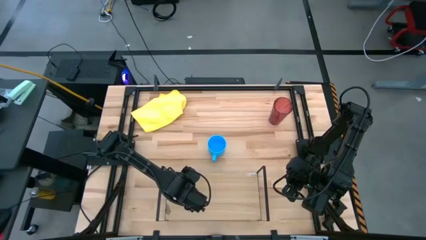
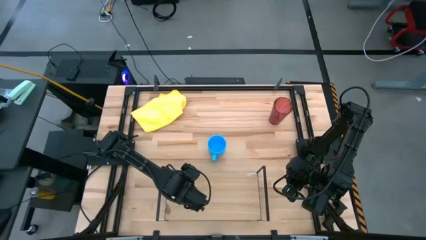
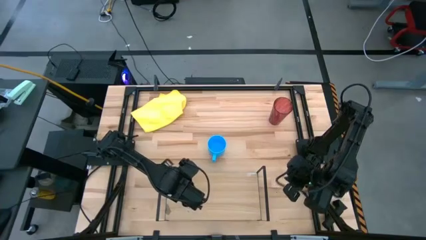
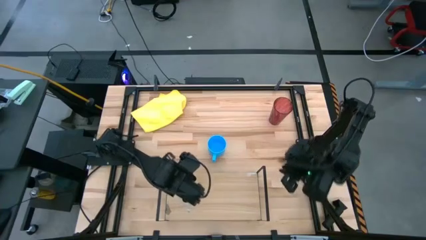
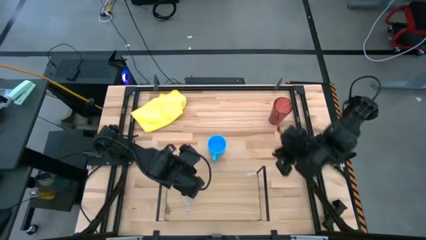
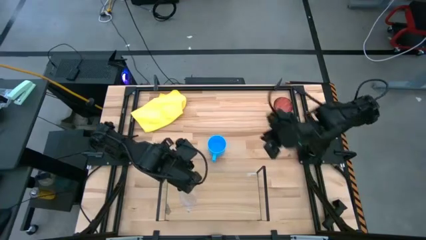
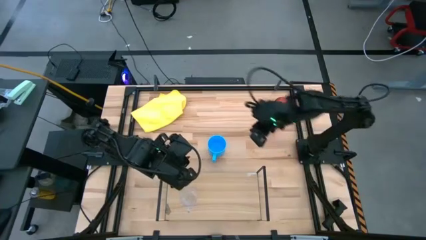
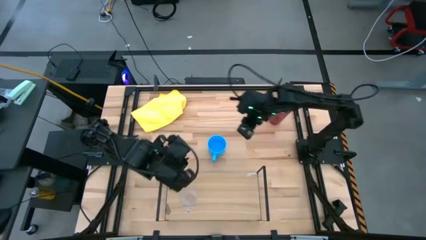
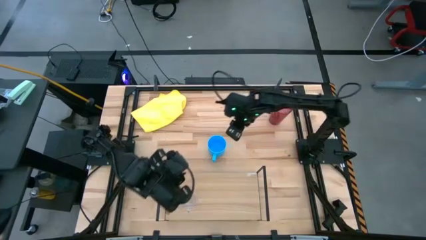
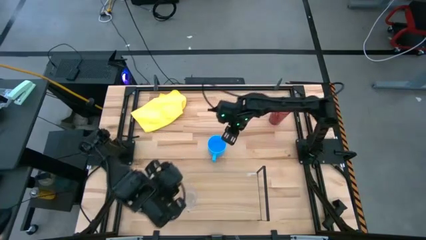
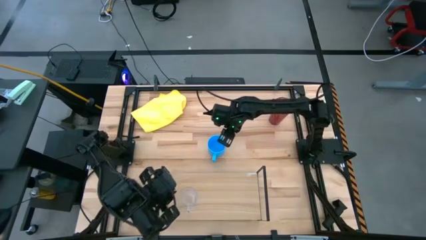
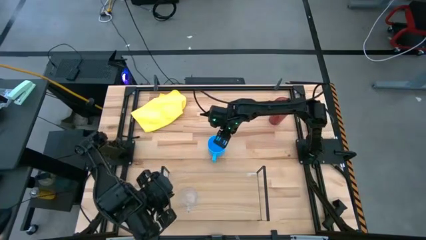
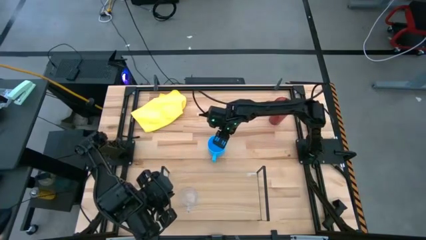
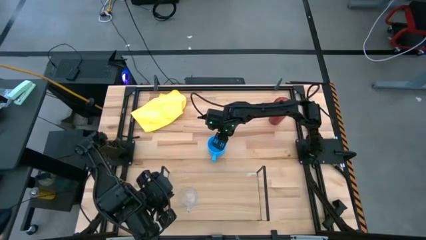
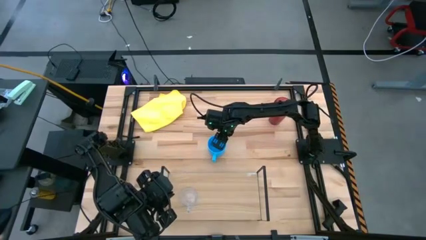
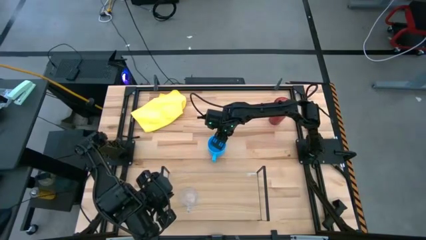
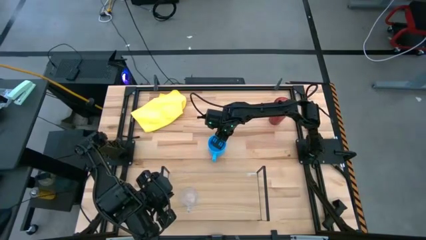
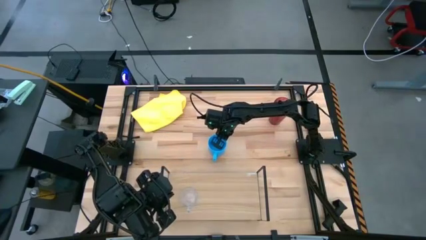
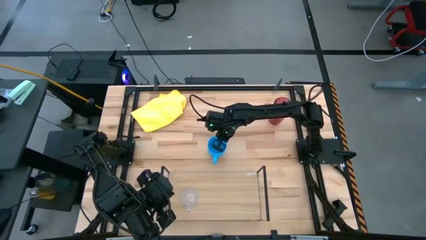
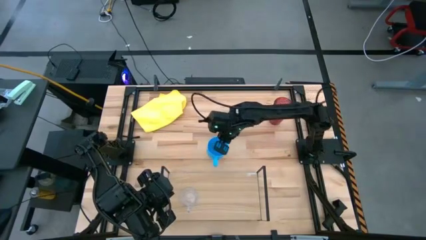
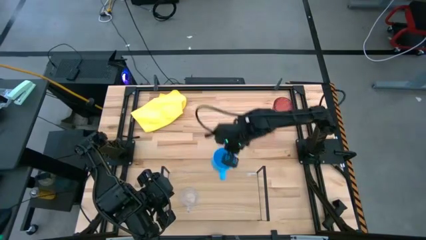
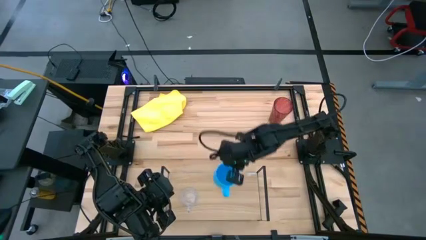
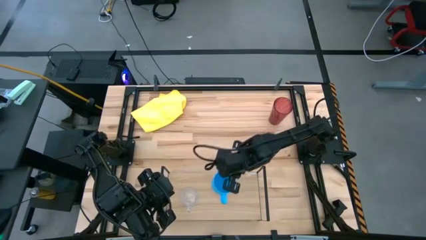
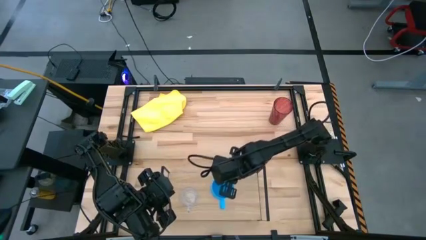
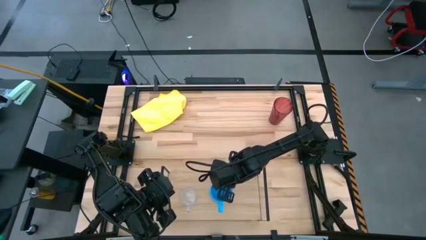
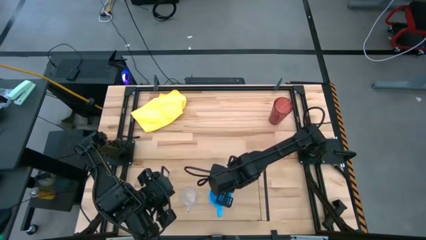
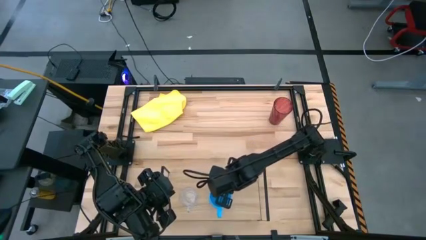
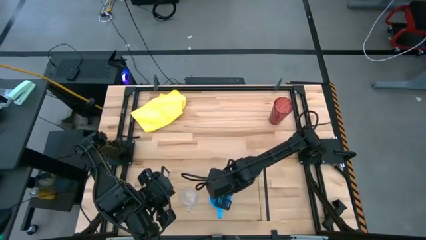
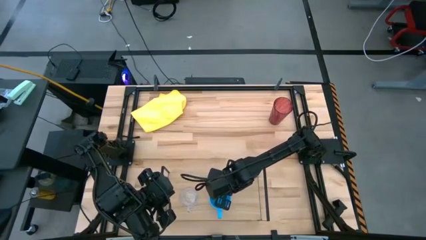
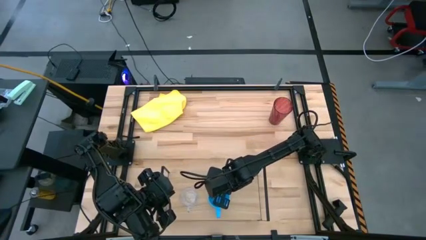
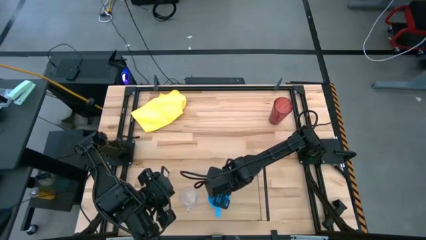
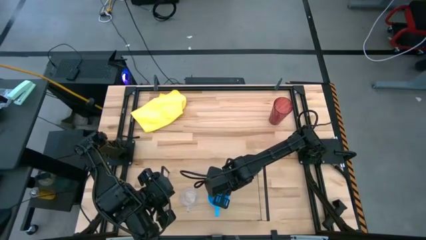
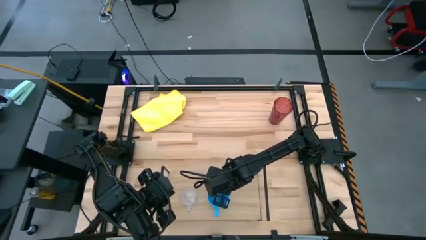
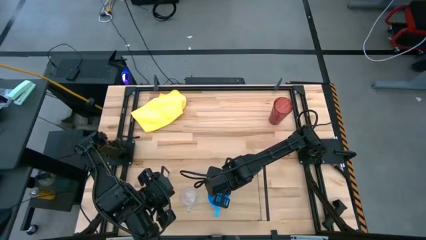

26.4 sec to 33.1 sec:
Task: Stack small to large cups/mugs on shelf
Put the blue mug on the shelf

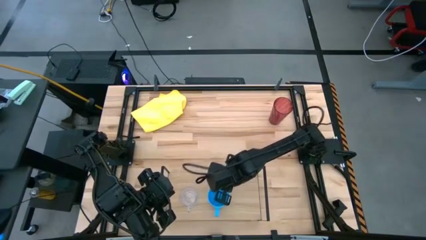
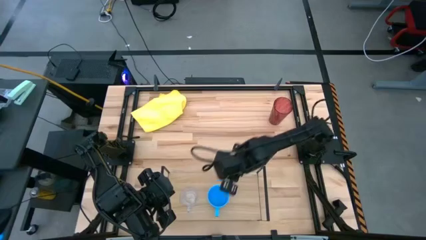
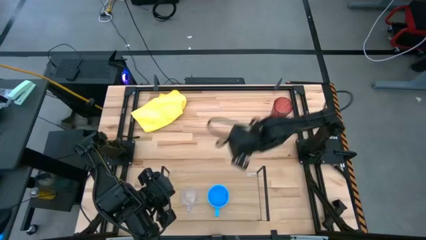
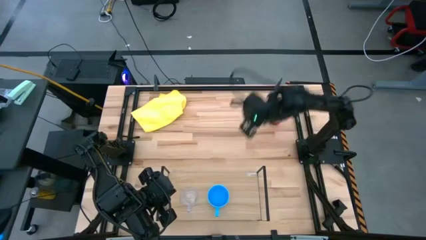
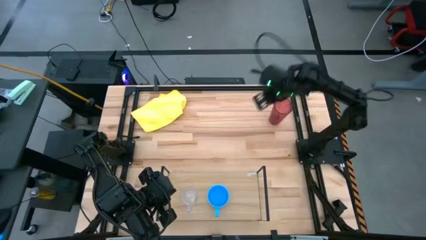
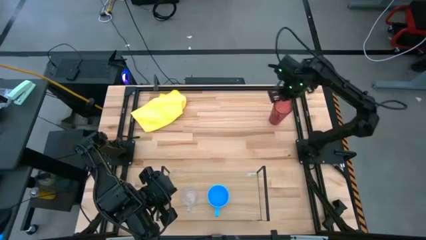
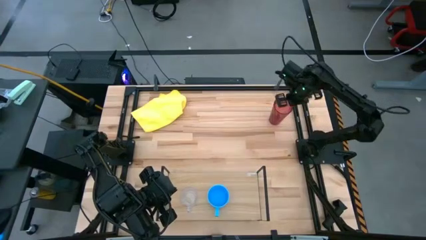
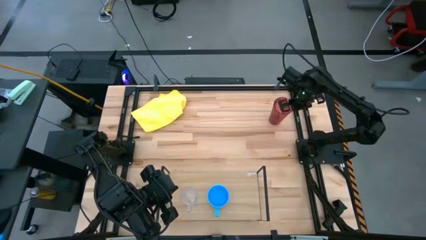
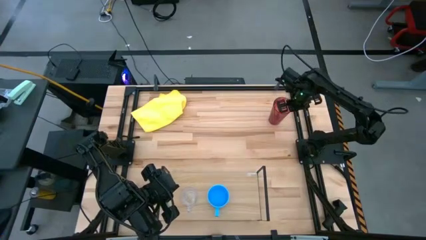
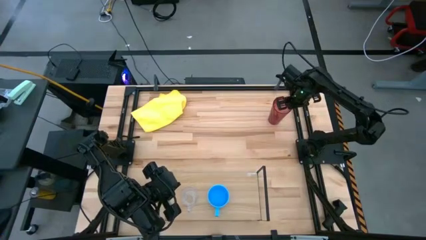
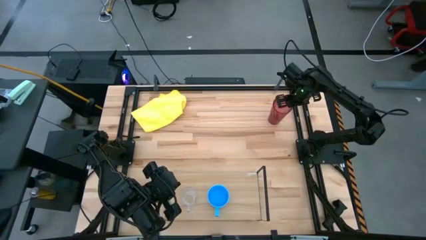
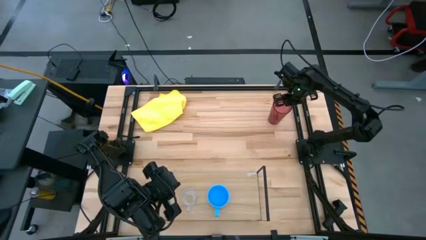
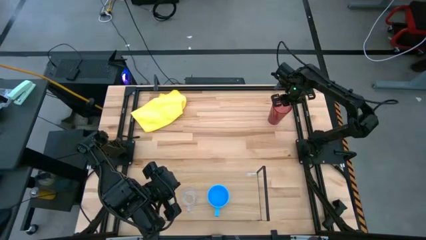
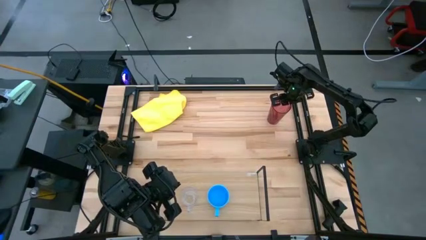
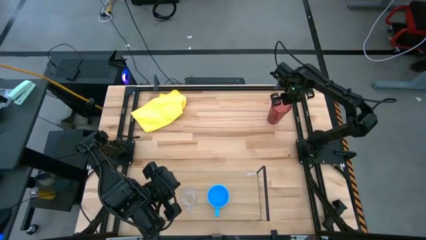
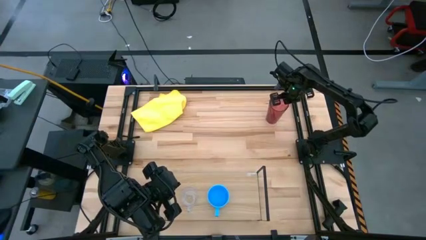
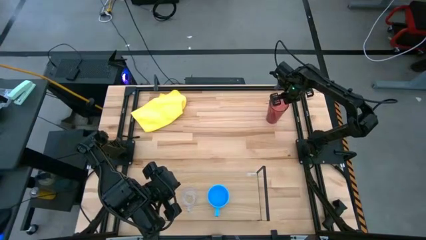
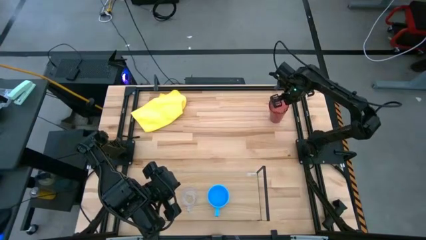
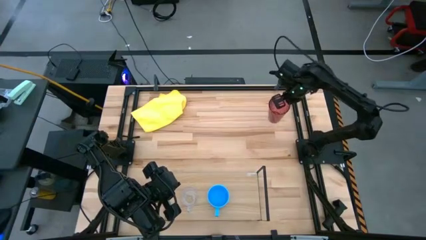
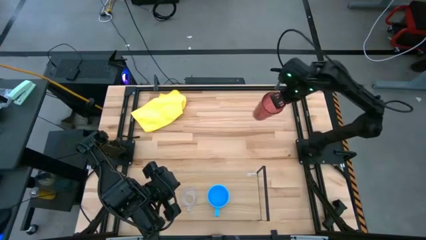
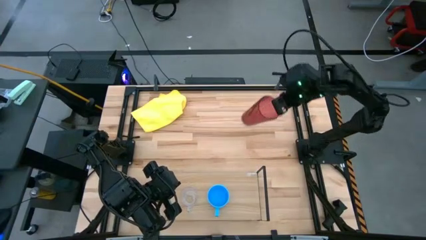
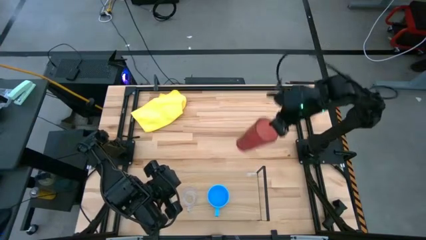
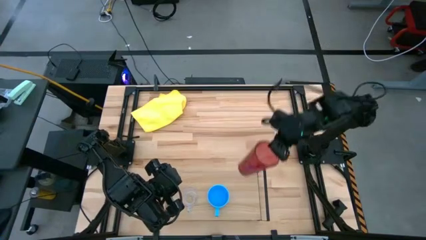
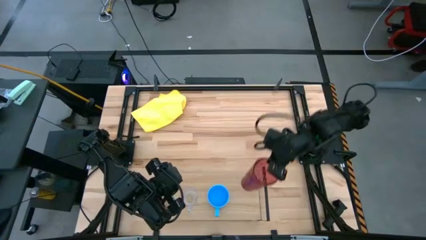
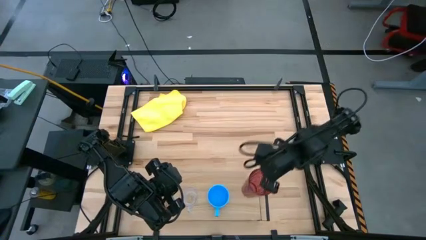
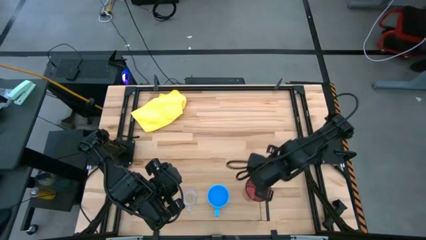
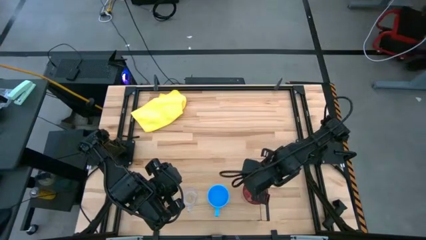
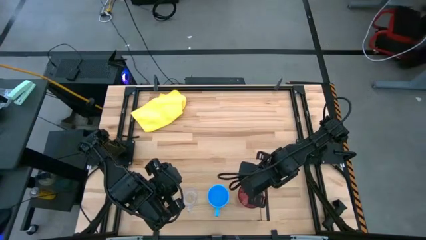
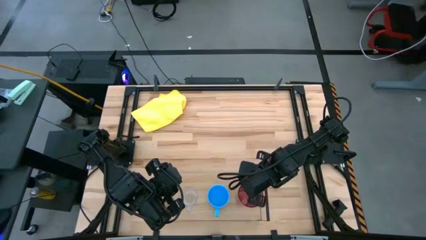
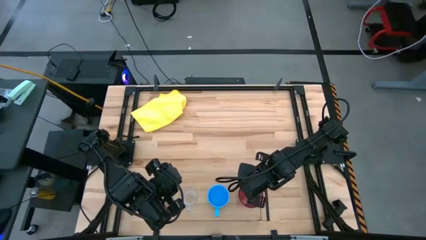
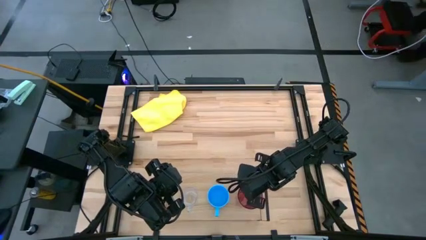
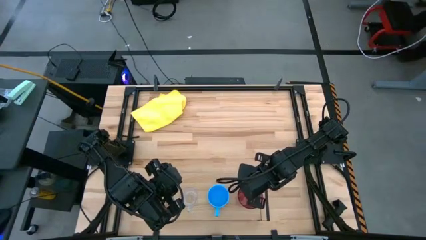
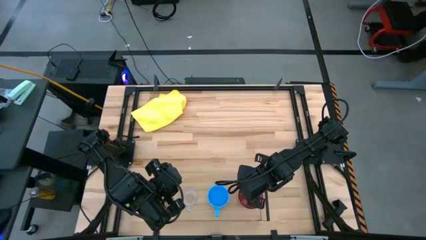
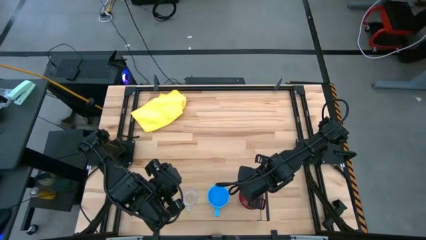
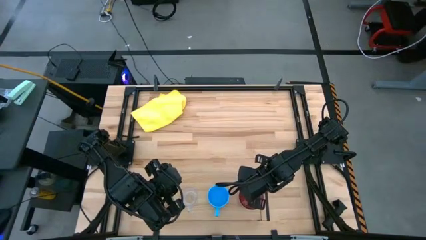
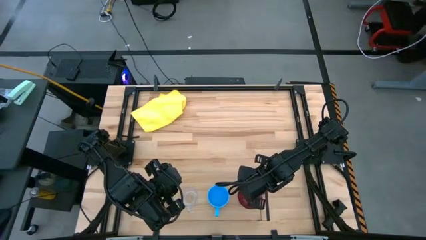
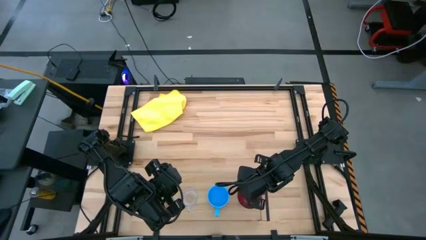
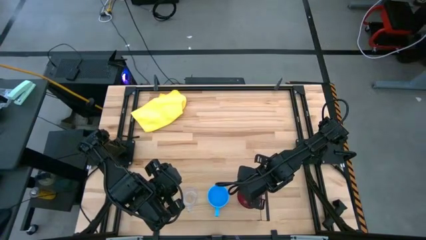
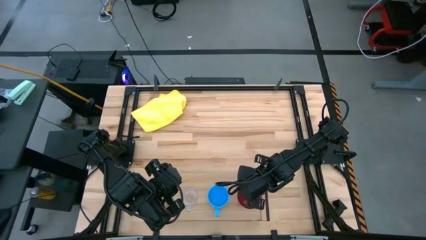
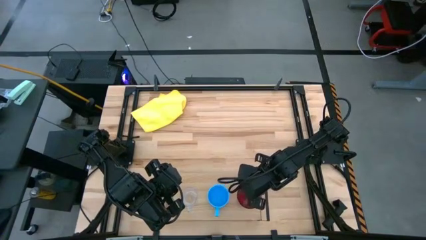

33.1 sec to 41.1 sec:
Put the red cup on the shelf

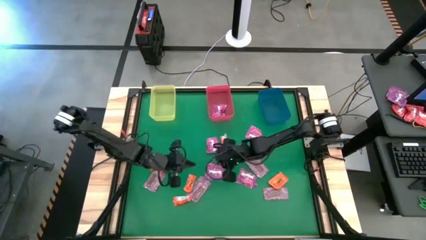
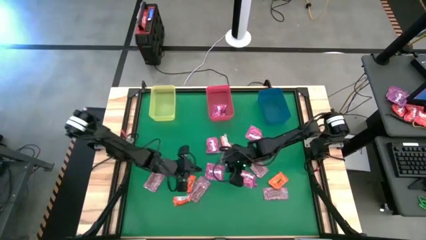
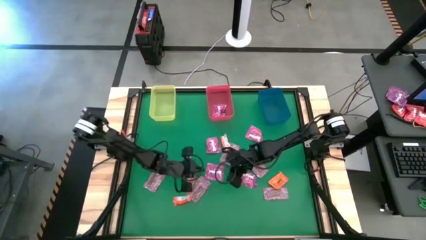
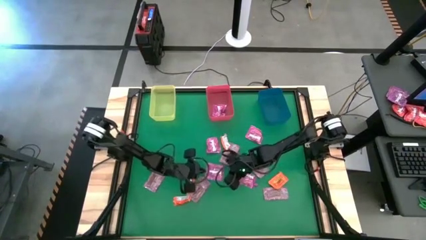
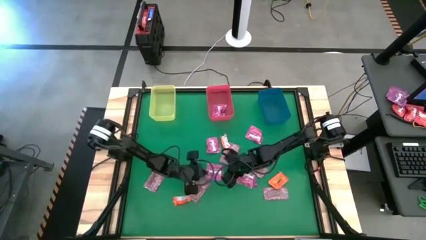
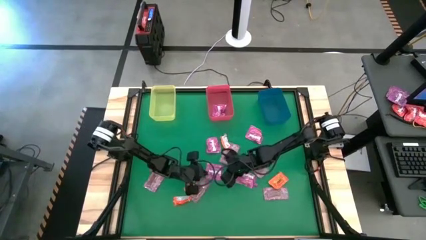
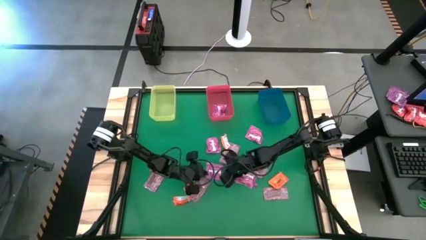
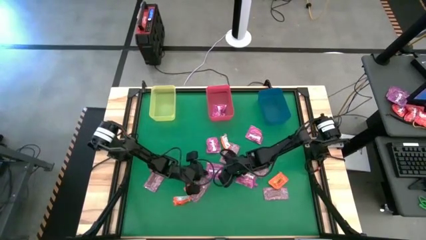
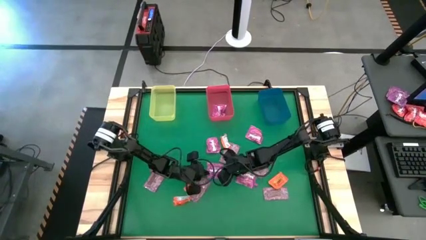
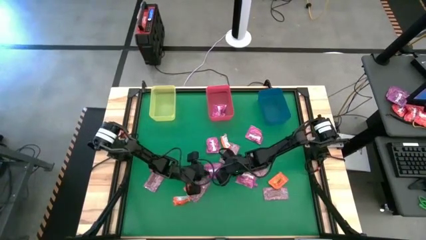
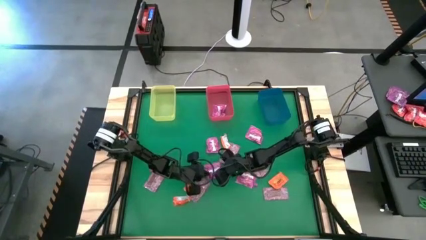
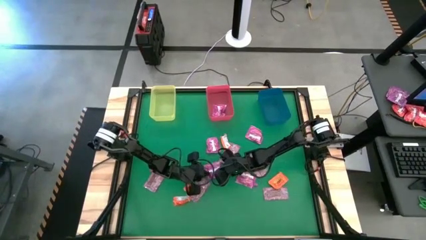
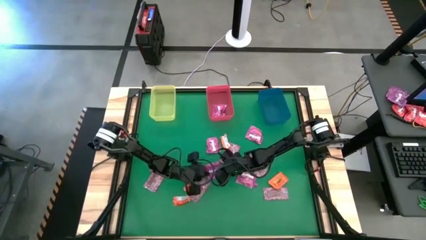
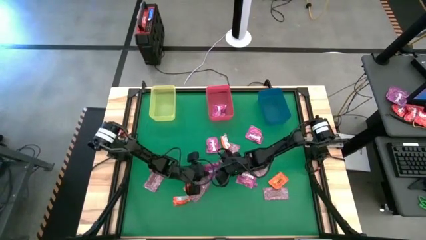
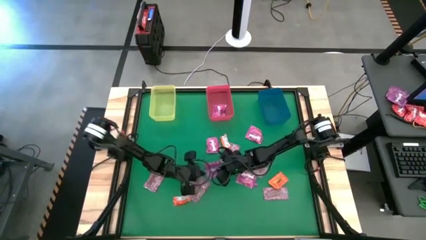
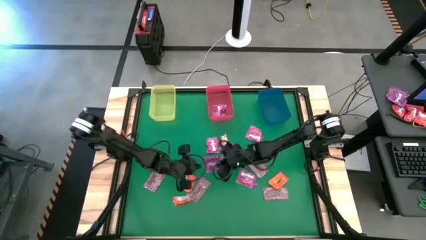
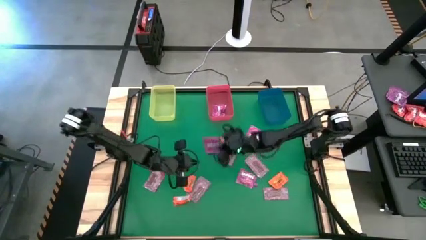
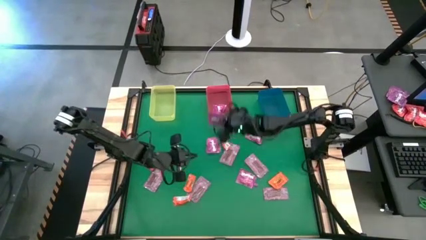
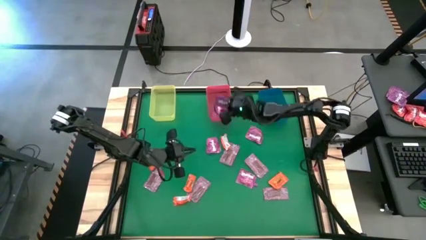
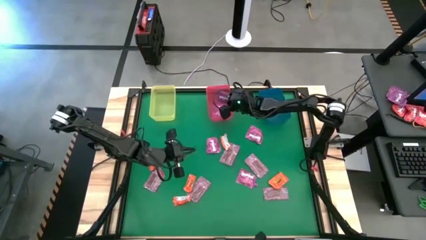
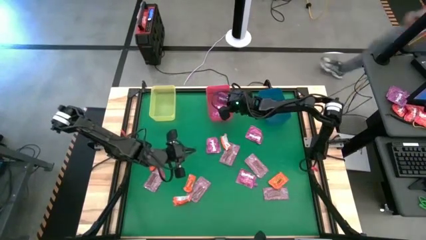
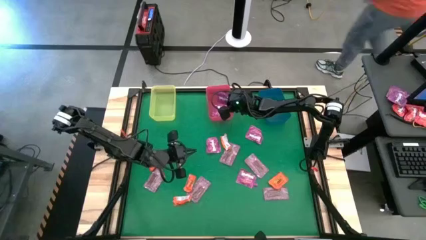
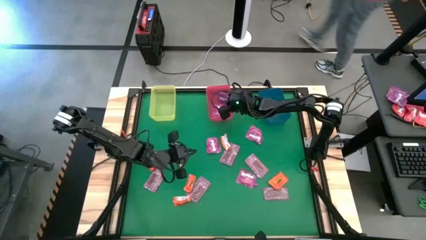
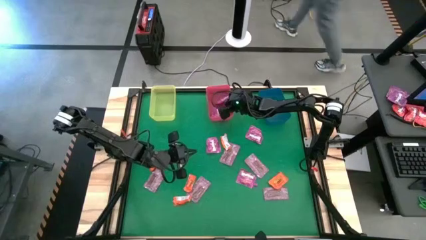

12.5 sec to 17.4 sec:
Task: Sort candy by brand, put in halloween buckets
Put the violet candy into the pink bin
